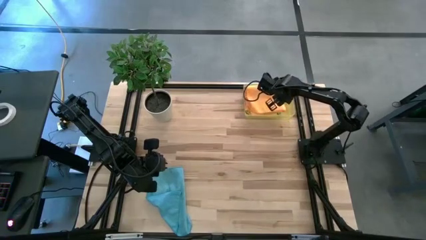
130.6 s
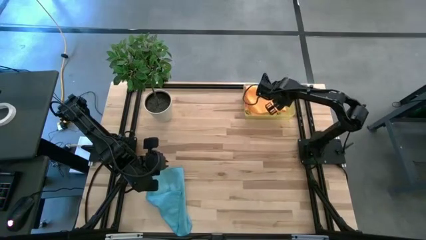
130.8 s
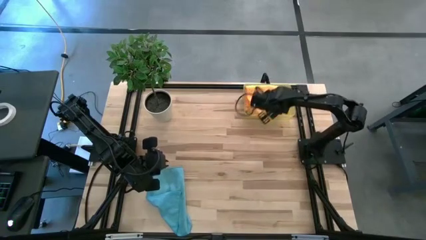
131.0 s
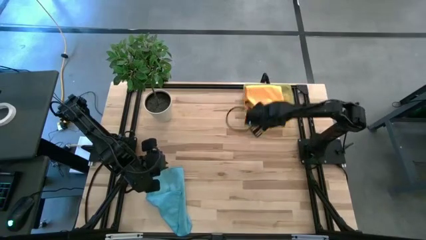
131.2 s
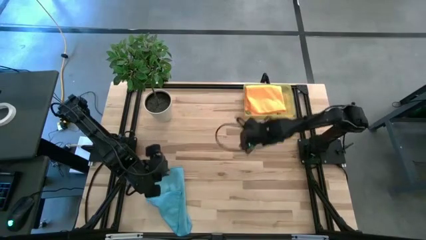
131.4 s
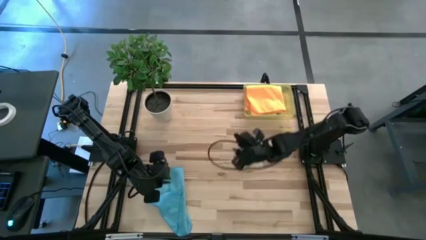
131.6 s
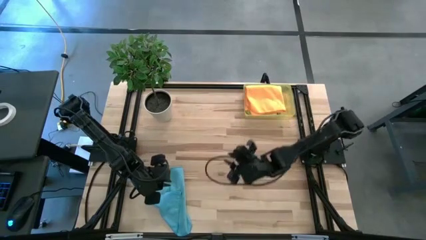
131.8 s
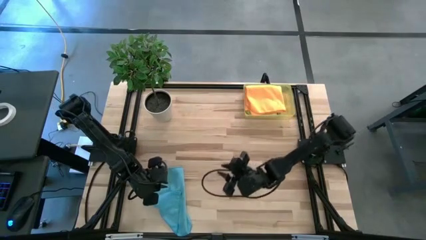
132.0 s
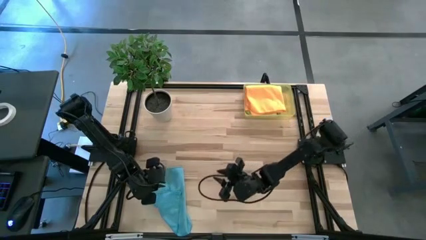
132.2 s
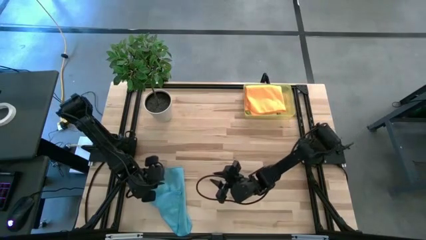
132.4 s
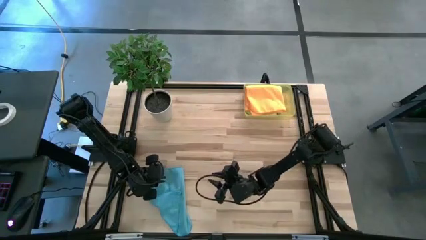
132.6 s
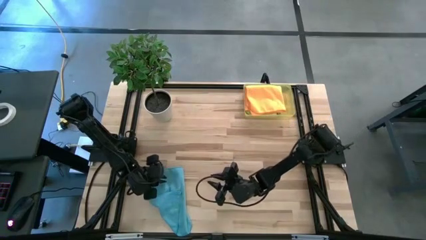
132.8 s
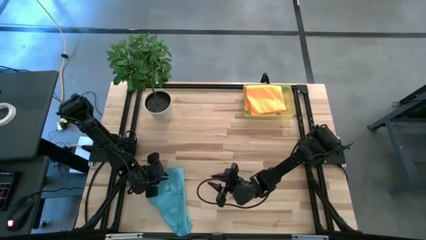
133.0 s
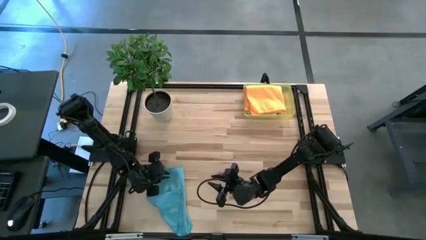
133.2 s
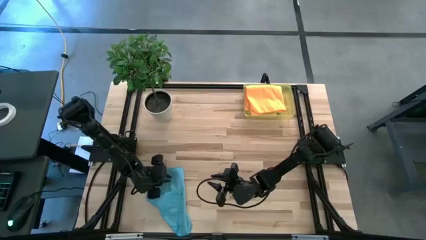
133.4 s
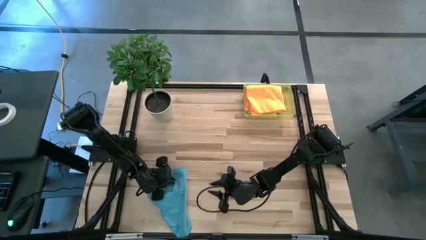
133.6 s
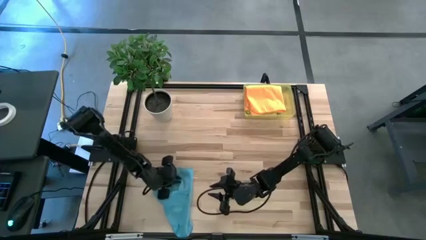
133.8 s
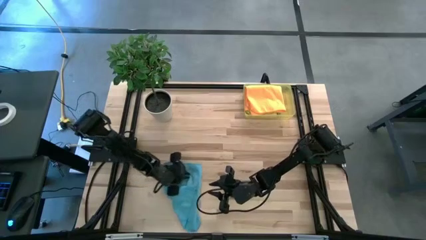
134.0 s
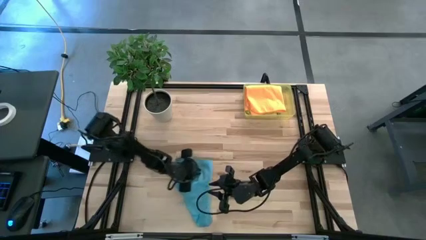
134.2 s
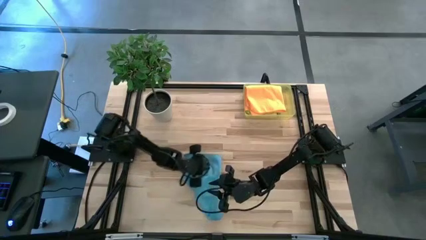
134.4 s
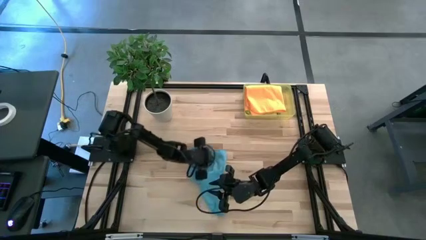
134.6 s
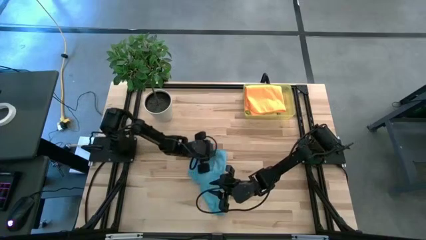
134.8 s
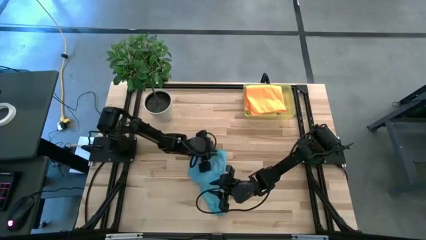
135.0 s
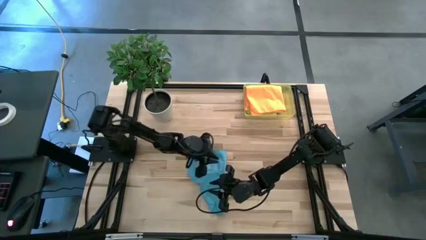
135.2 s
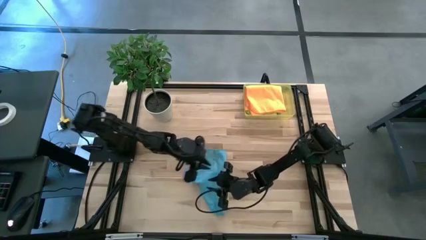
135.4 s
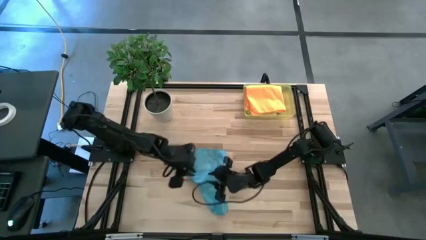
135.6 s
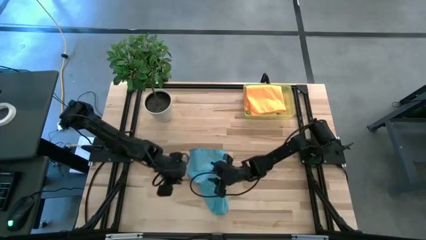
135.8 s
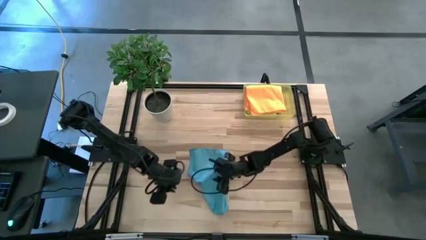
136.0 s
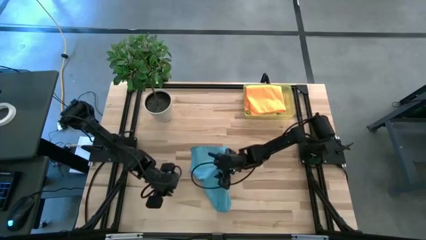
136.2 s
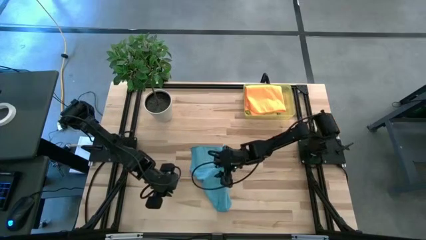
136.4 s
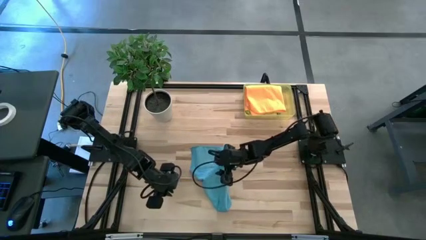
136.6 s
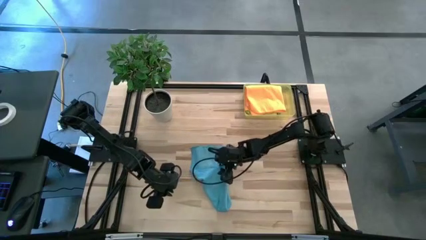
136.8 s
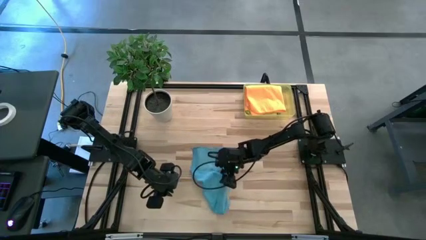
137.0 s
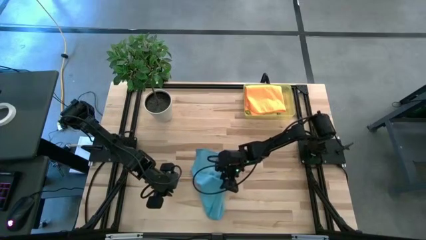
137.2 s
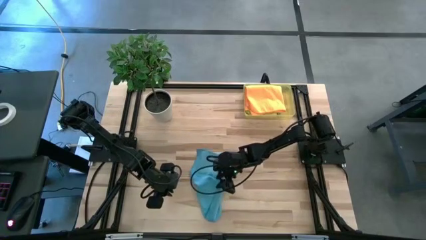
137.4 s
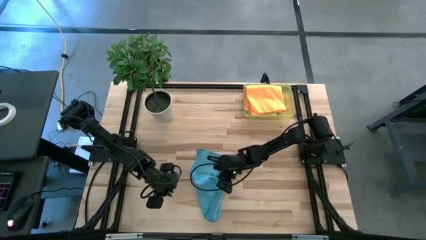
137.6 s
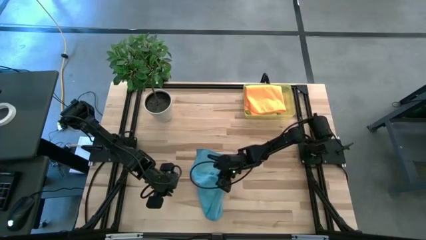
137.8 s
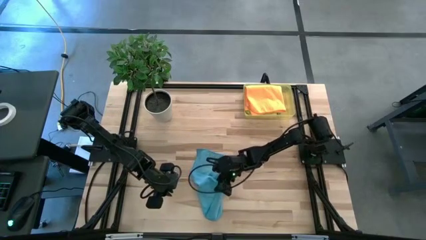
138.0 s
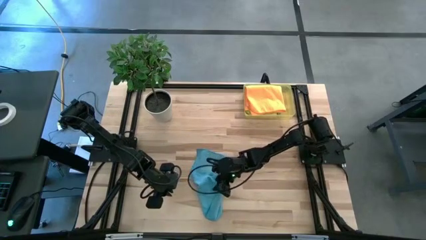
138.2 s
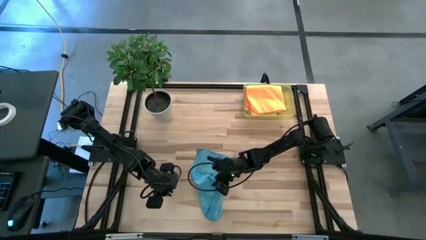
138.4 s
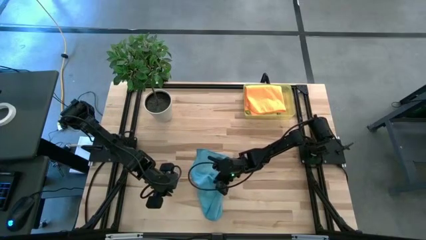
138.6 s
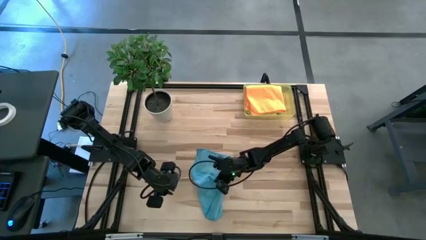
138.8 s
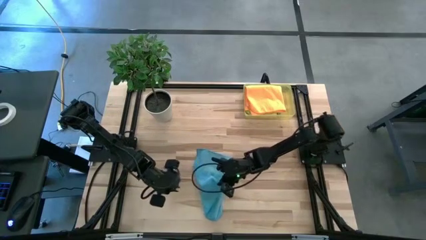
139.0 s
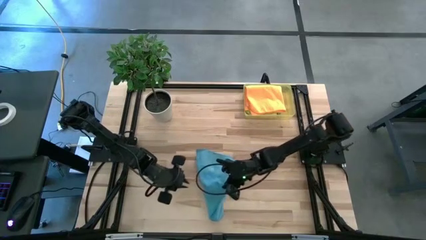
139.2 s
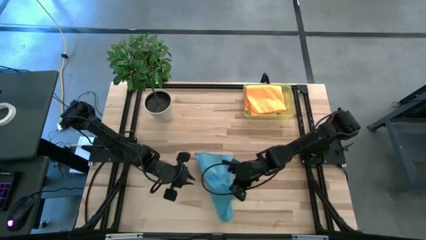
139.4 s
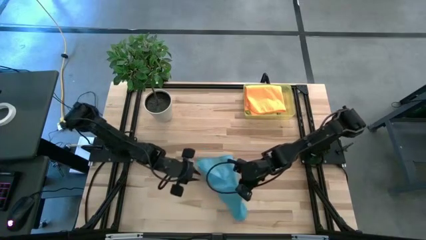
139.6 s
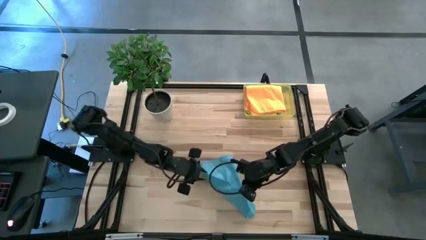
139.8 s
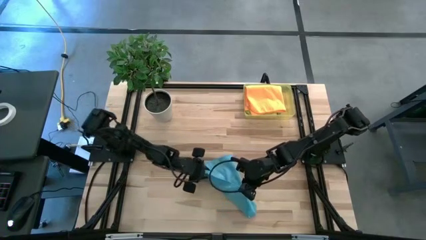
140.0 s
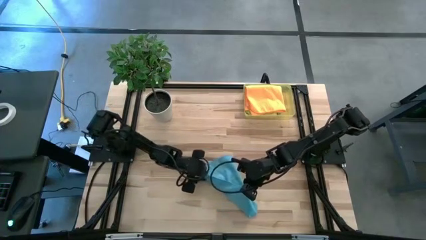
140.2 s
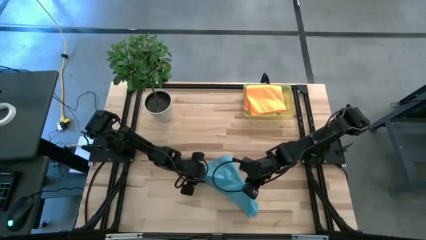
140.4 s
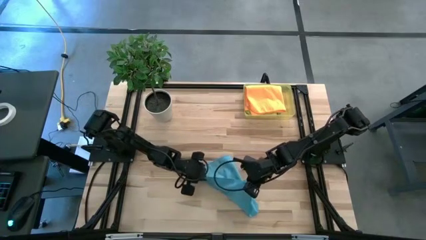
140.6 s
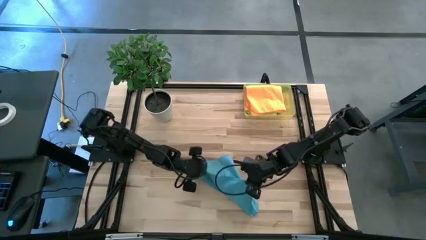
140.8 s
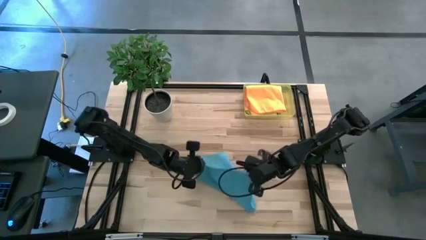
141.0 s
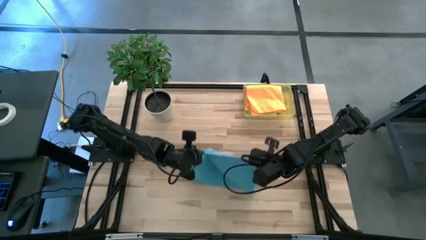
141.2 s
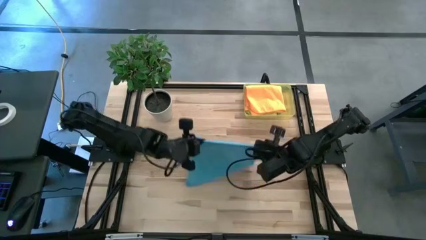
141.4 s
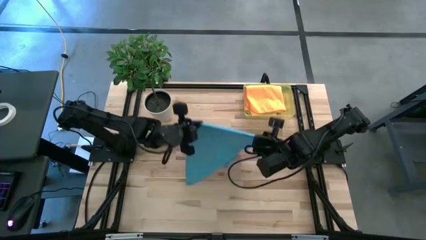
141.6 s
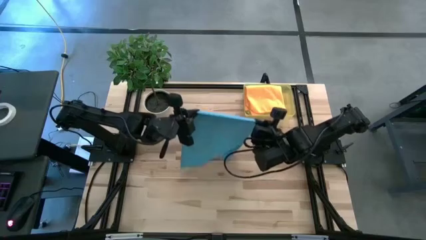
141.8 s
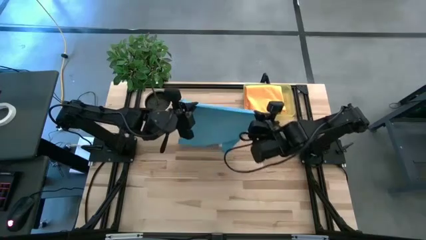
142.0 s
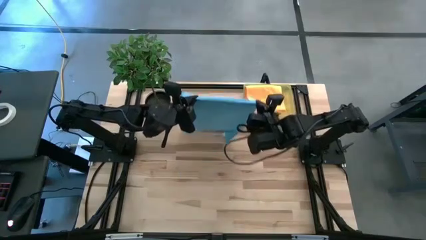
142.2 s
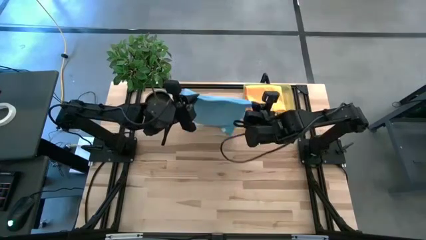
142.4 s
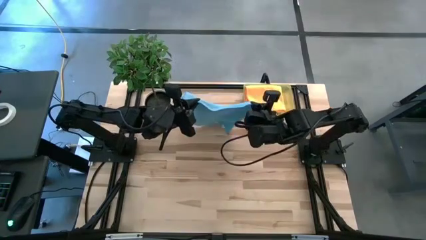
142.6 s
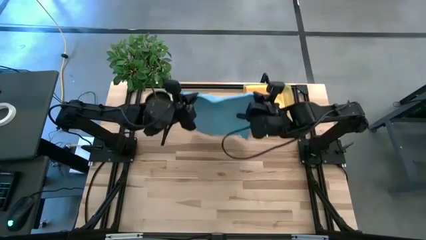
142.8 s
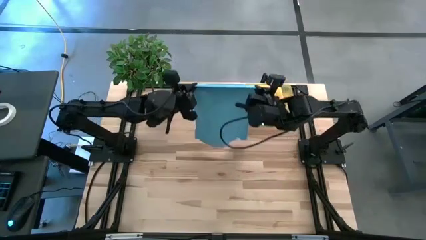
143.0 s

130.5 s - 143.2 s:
Task: Fold microfiber towels
Fold the blue microfiber towel
